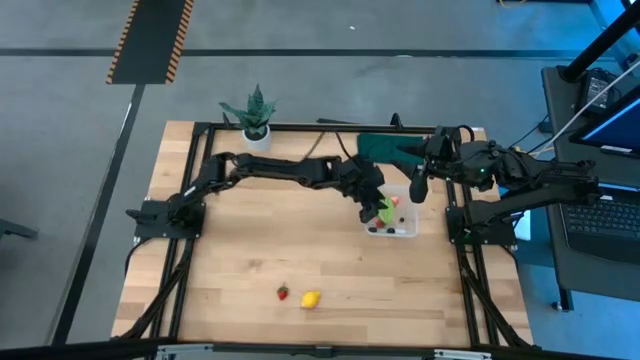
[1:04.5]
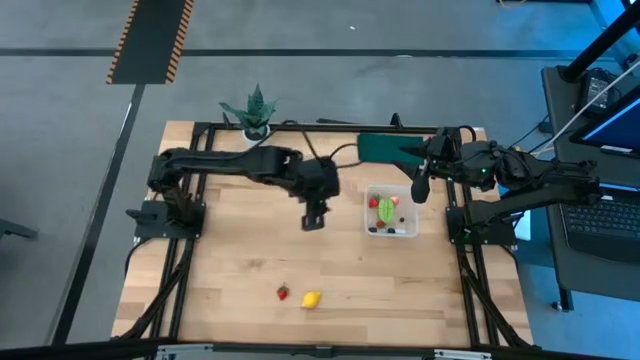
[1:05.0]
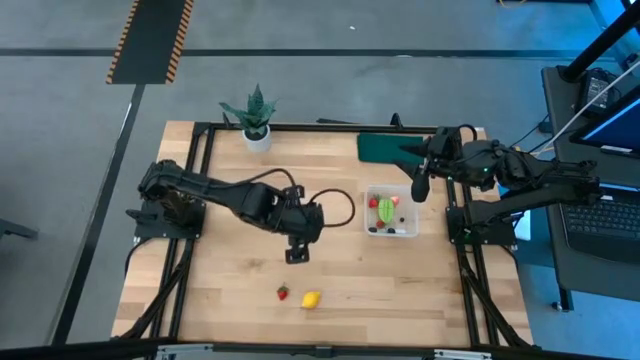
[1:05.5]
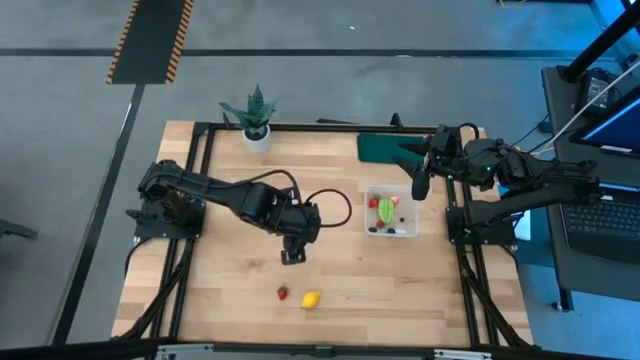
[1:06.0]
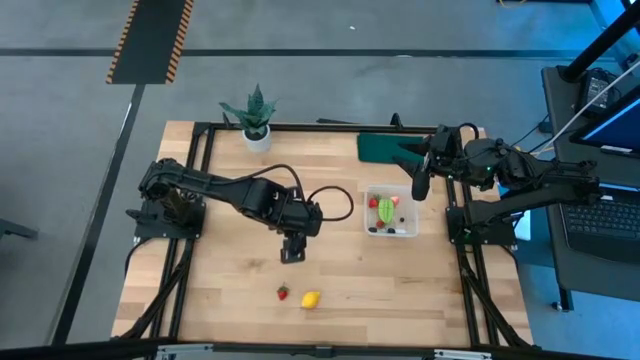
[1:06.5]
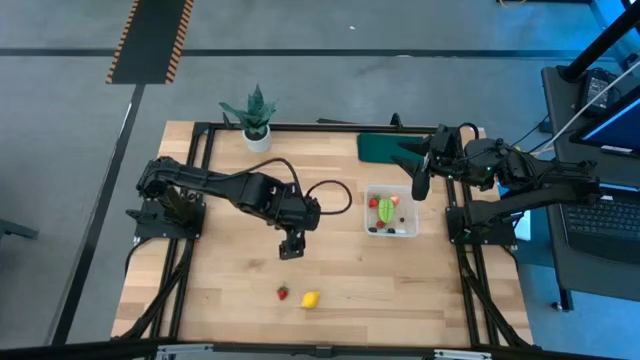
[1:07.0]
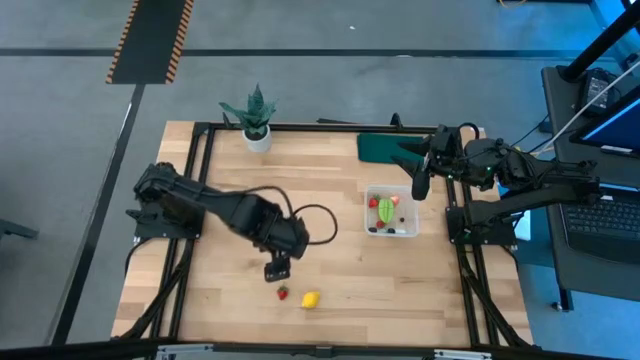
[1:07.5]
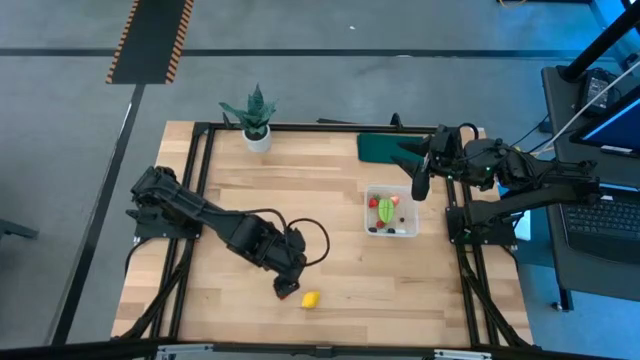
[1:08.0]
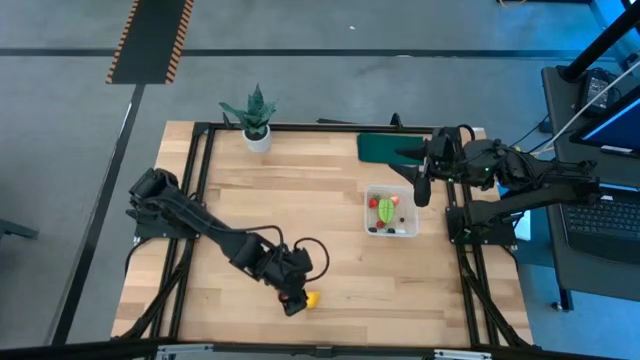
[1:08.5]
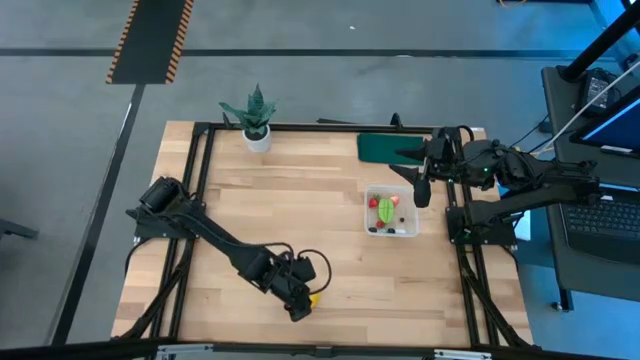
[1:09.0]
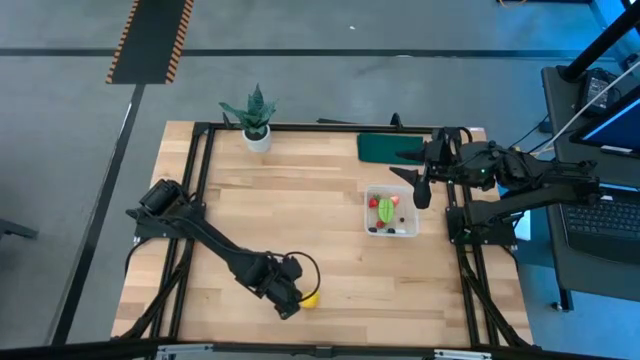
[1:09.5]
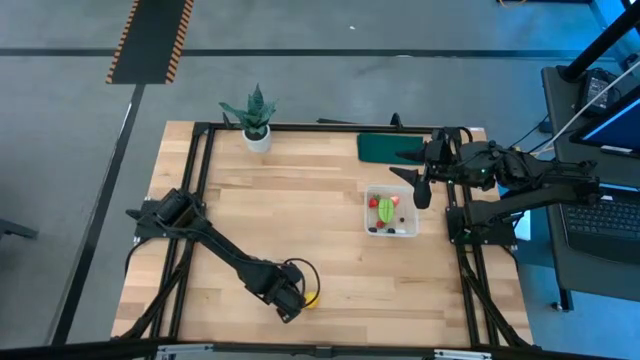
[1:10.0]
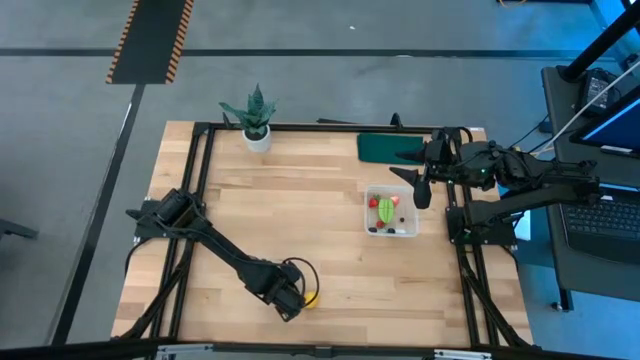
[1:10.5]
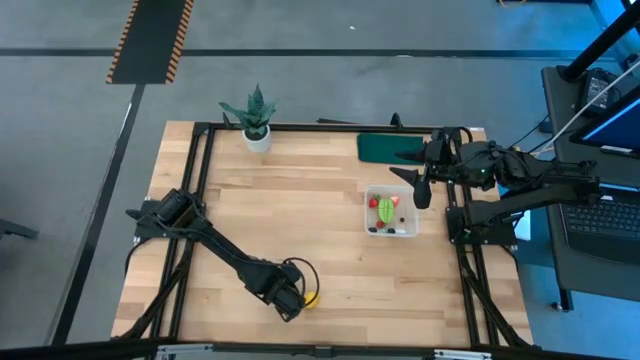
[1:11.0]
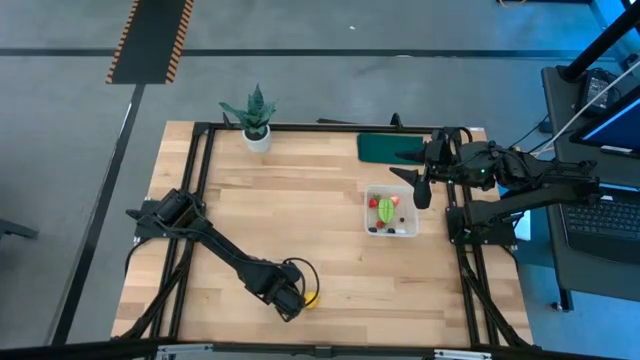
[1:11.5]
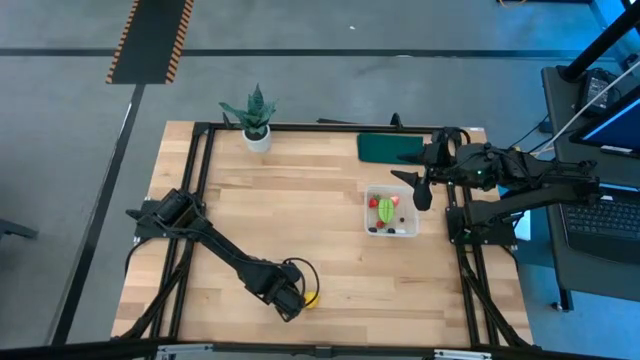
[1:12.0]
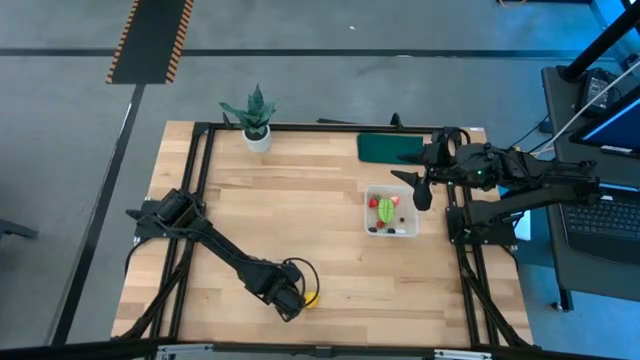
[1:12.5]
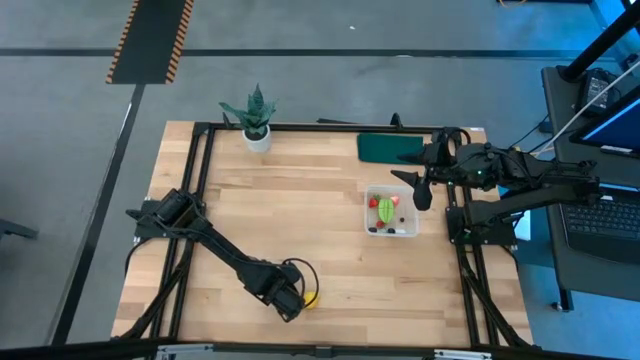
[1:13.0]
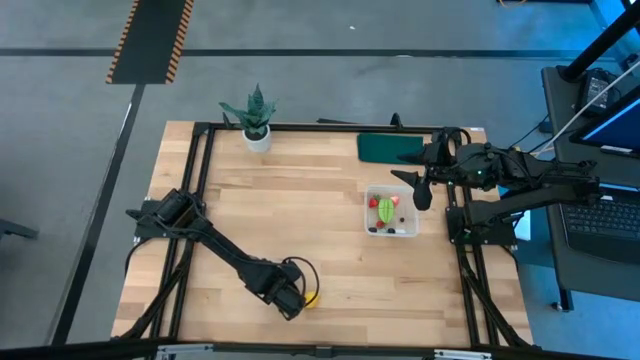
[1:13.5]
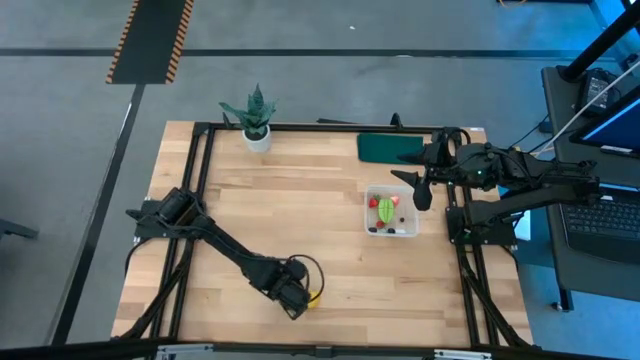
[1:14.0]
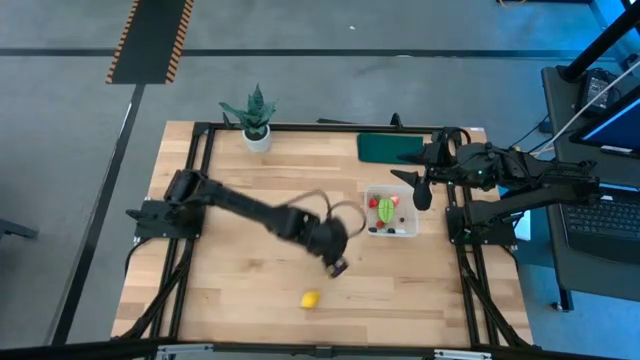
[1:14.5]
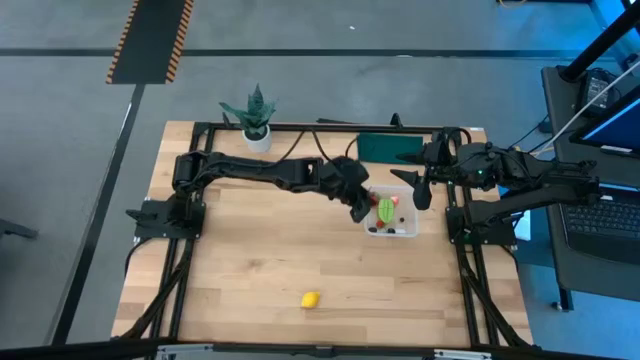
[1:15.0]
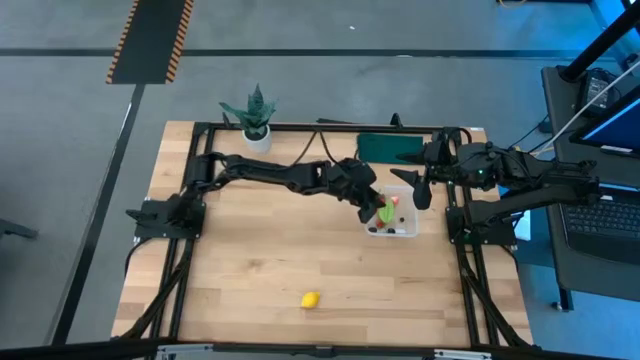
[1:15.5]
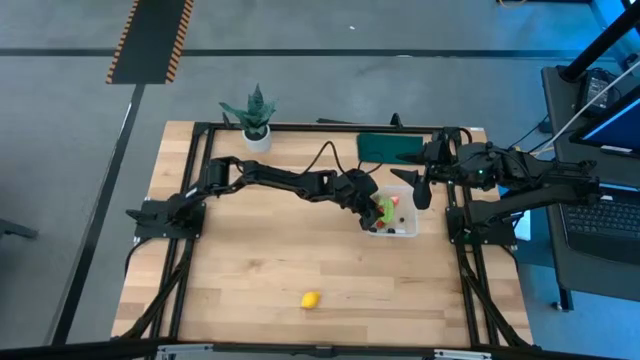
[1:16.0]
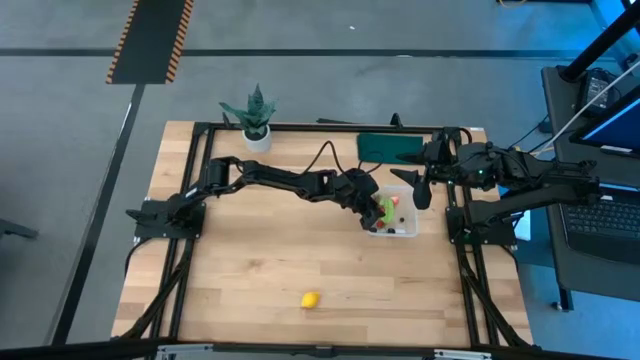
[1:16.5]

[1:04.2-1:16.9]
Task: Pick and placing Produce into tupperware
Put the red strawberry into the transparent container

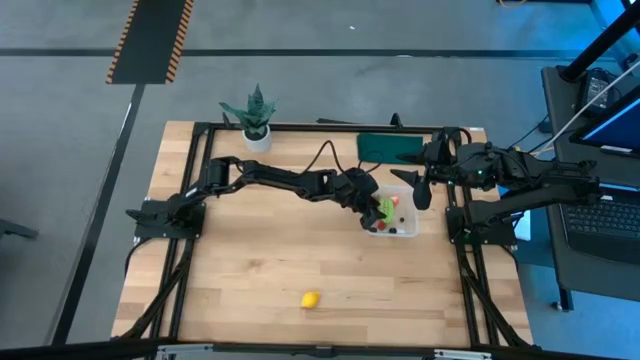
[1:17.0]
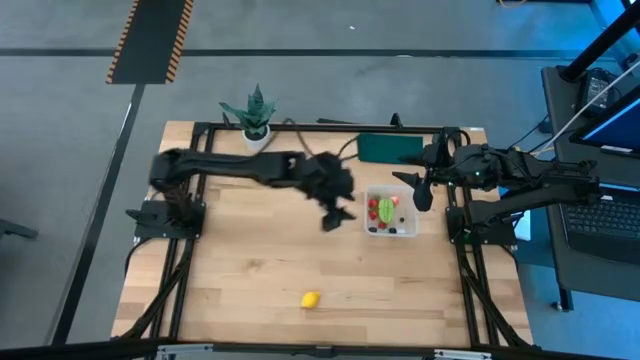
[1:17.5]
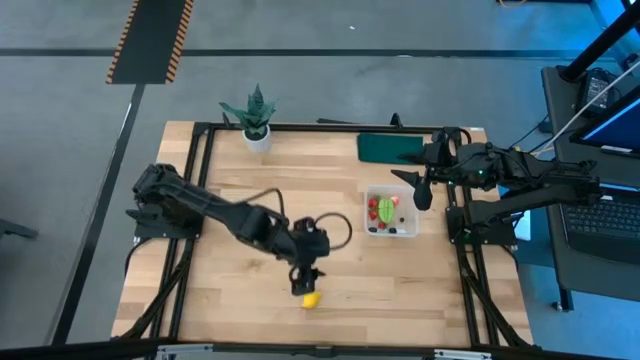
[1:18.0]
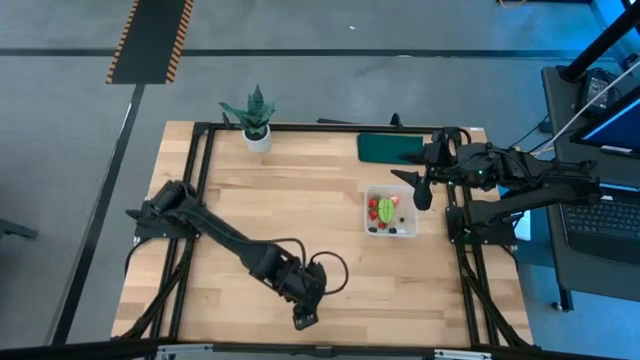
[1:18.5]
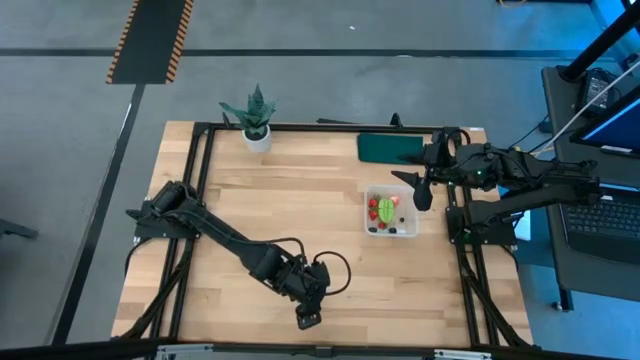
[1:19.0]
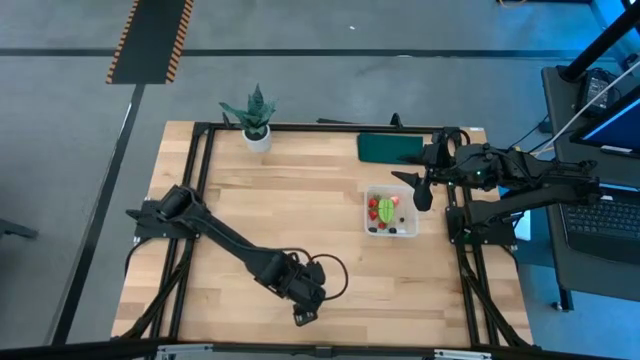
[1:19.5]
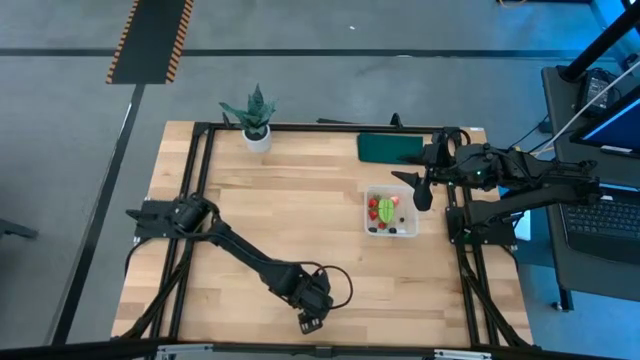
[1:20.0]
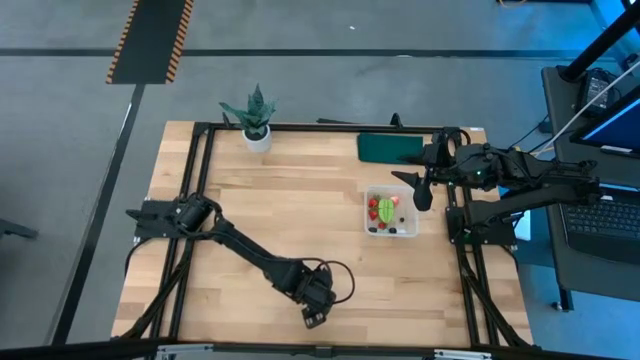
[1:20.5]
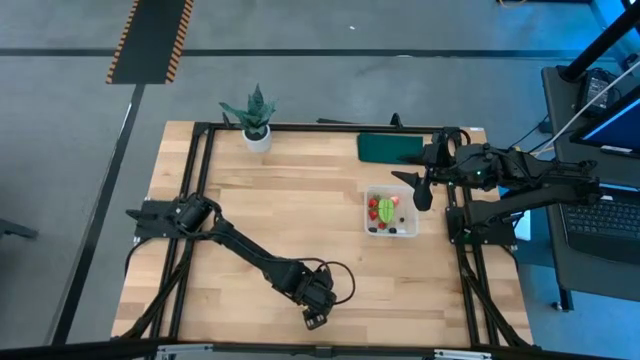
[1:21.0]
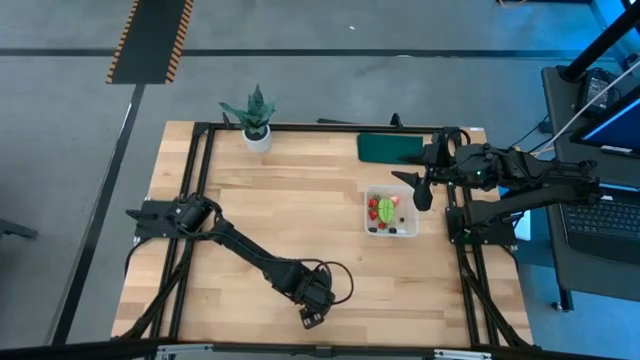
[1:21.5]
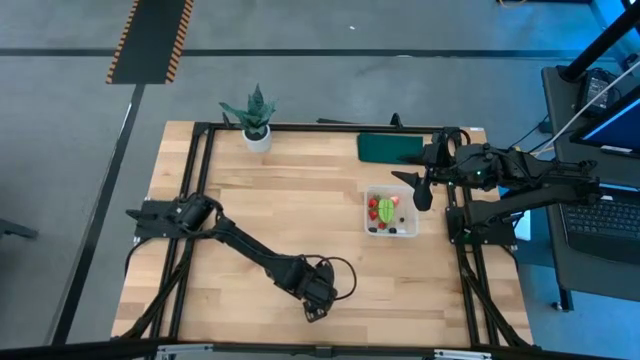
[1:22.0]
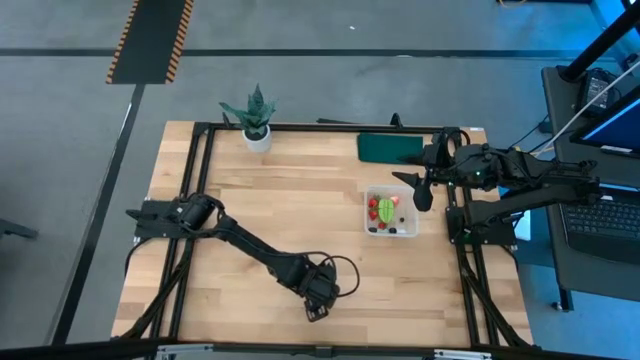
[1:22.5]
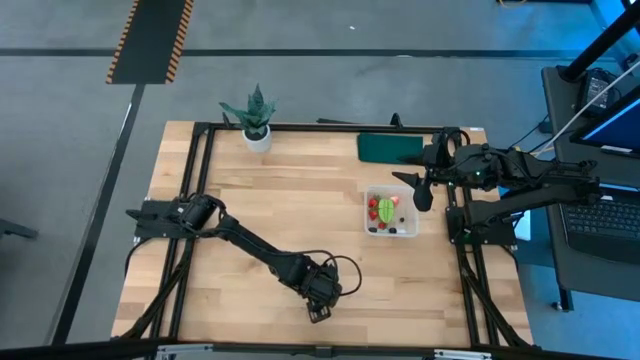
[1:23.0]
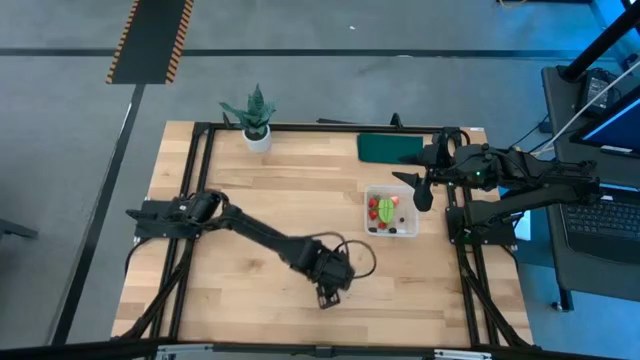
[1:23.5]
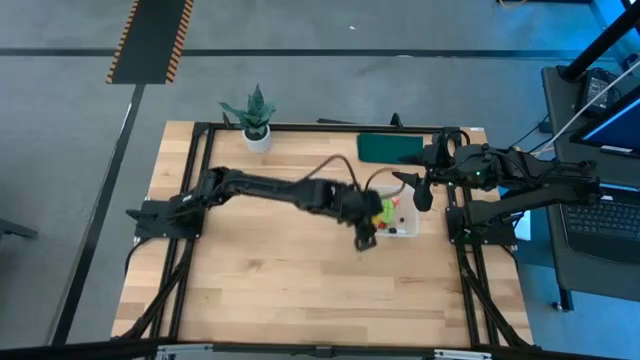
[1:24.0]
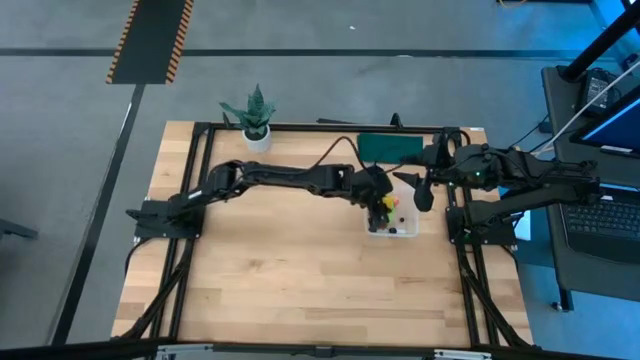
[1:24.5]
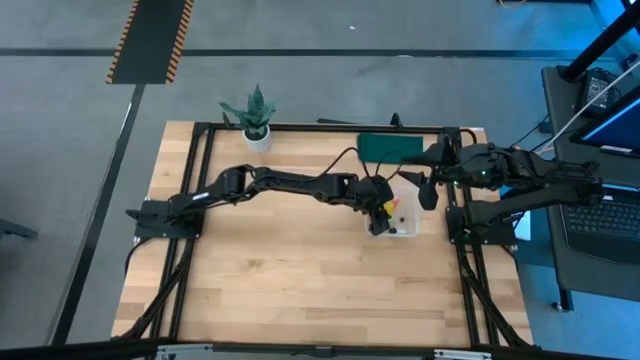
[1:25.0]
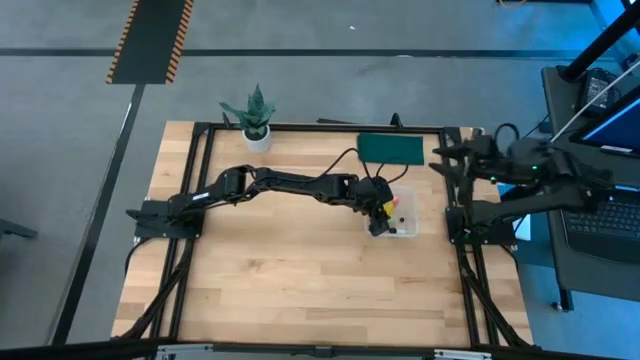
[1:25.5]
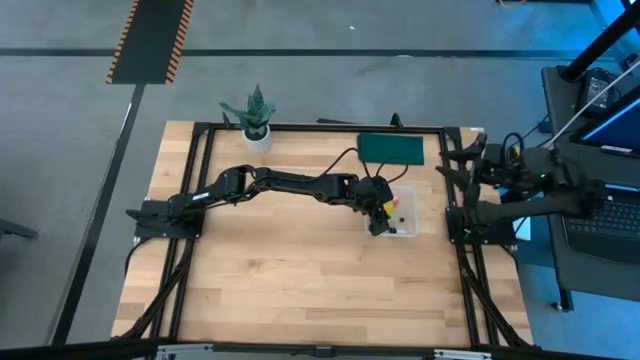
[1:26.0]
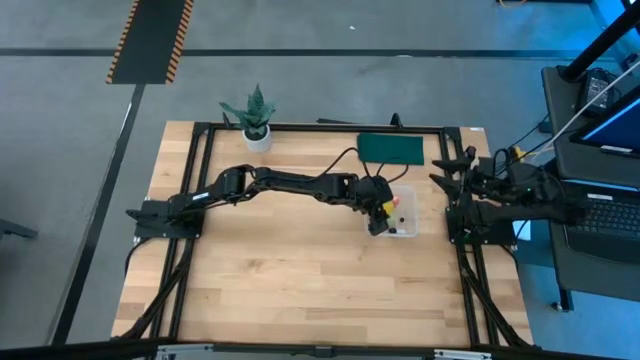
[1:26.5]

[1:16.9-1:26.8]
Put the yellow lemon into the transparent container
